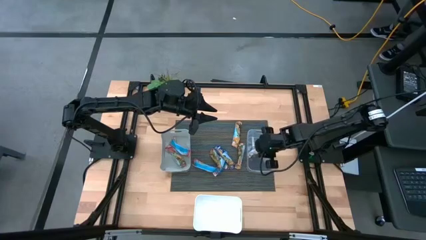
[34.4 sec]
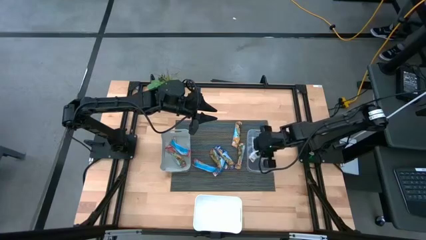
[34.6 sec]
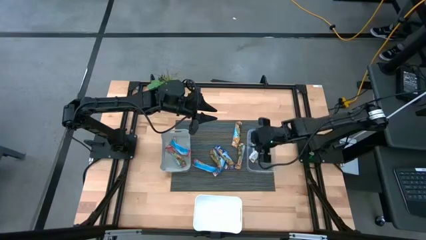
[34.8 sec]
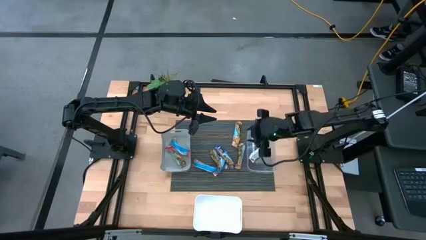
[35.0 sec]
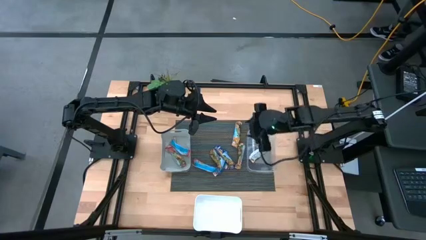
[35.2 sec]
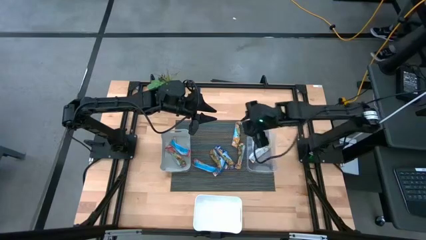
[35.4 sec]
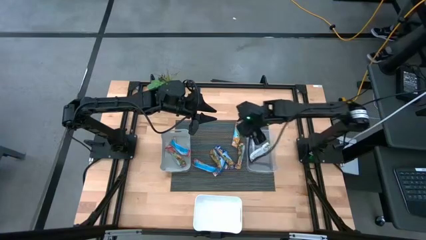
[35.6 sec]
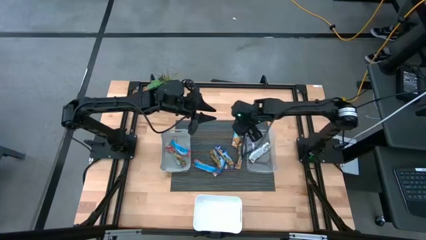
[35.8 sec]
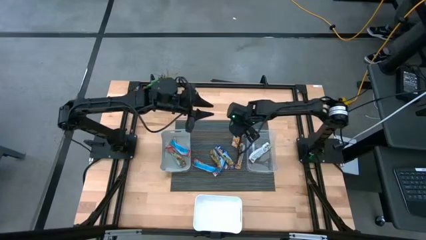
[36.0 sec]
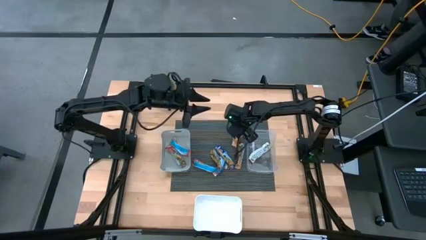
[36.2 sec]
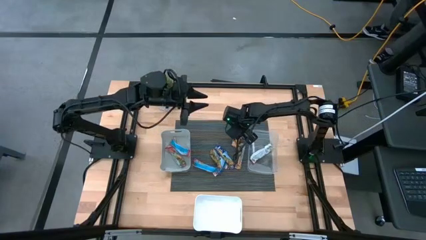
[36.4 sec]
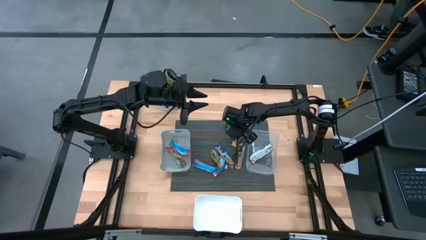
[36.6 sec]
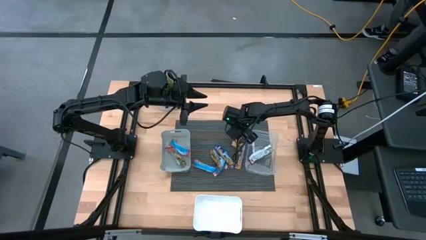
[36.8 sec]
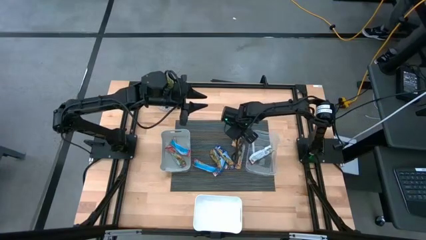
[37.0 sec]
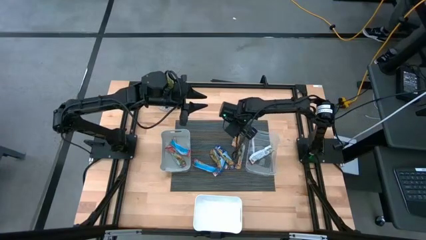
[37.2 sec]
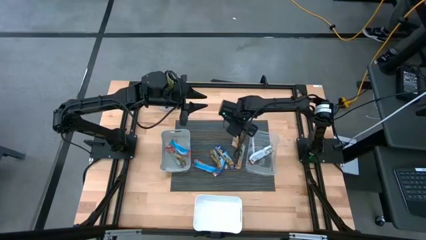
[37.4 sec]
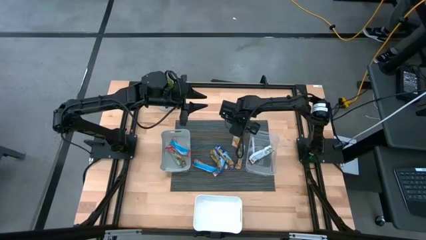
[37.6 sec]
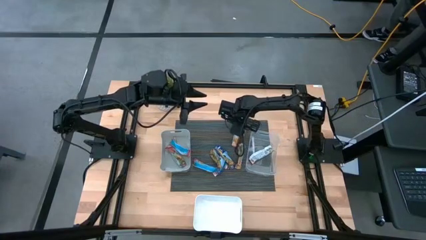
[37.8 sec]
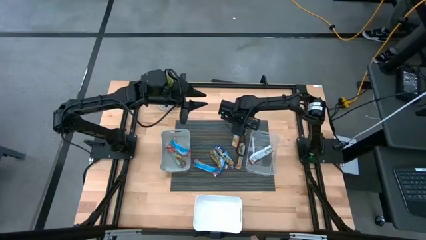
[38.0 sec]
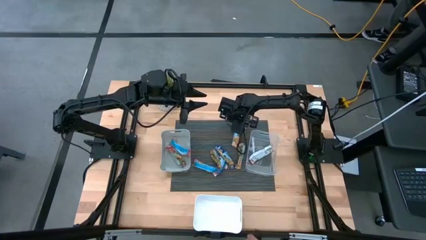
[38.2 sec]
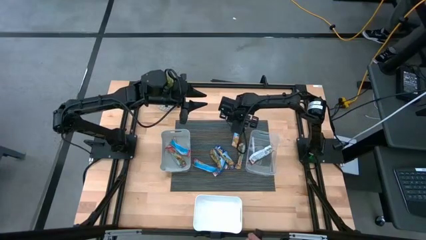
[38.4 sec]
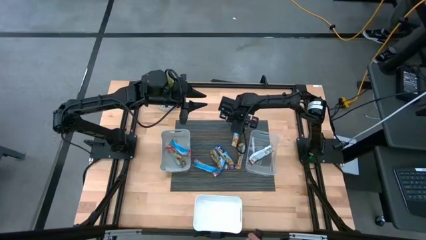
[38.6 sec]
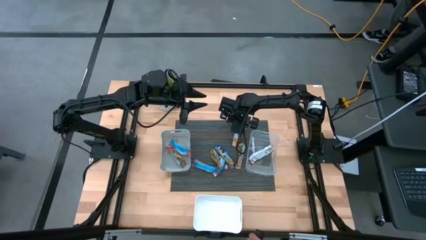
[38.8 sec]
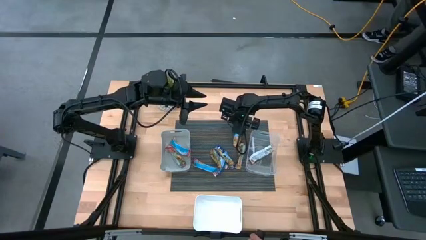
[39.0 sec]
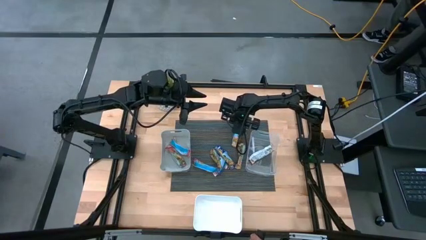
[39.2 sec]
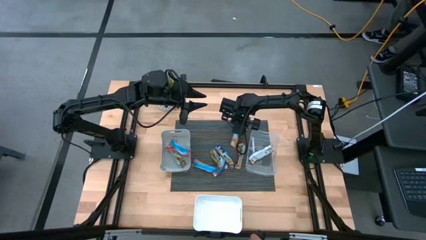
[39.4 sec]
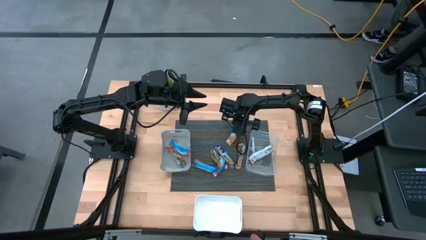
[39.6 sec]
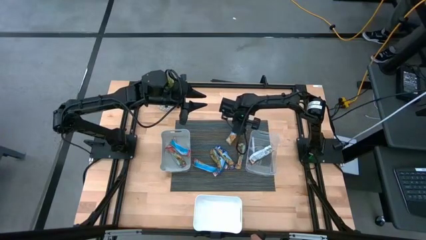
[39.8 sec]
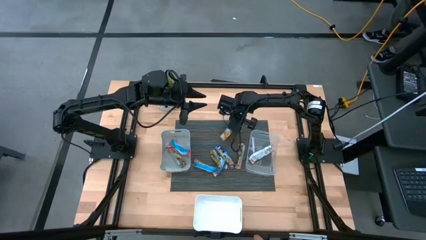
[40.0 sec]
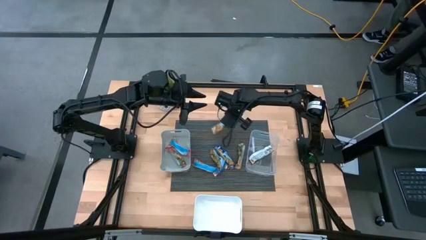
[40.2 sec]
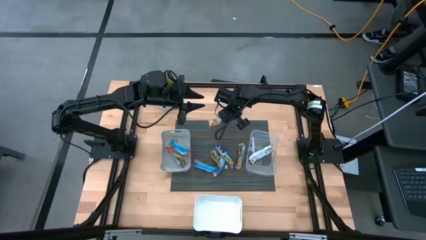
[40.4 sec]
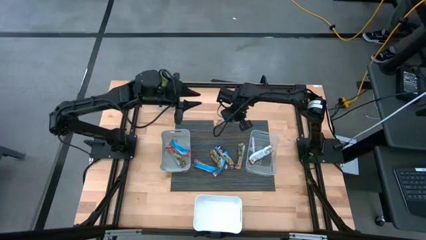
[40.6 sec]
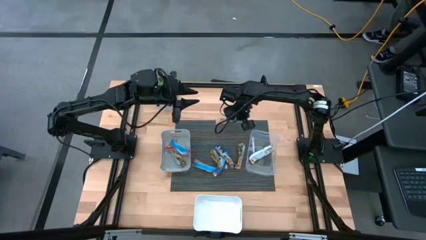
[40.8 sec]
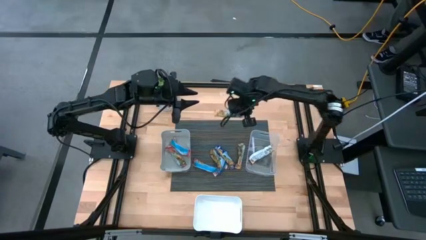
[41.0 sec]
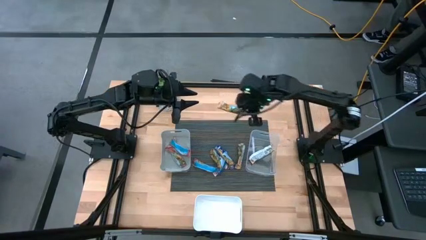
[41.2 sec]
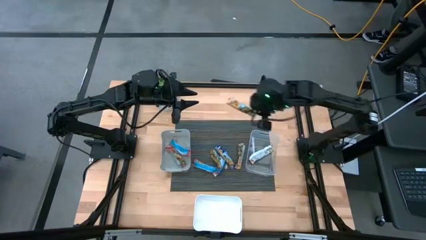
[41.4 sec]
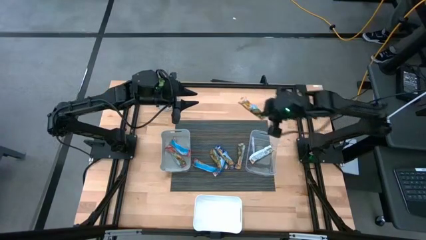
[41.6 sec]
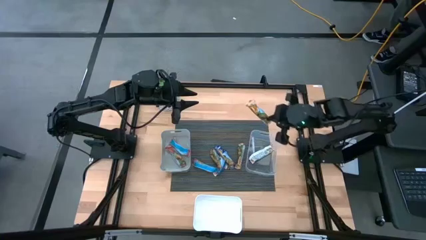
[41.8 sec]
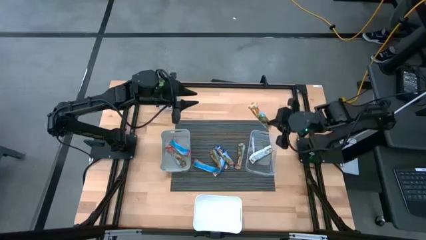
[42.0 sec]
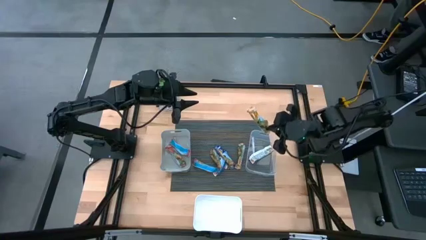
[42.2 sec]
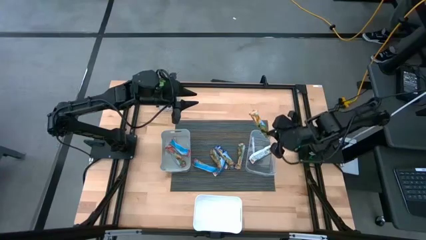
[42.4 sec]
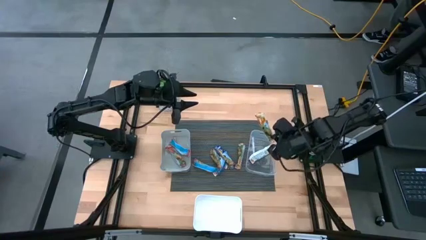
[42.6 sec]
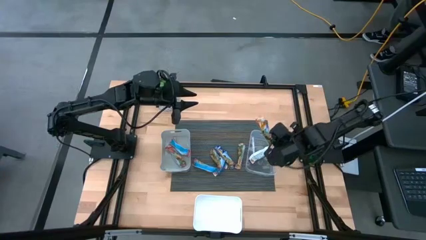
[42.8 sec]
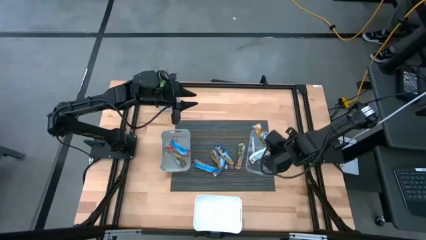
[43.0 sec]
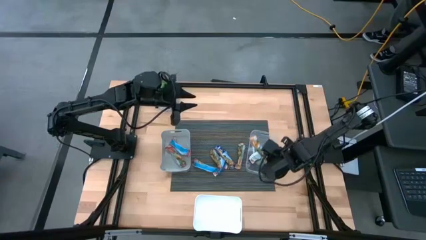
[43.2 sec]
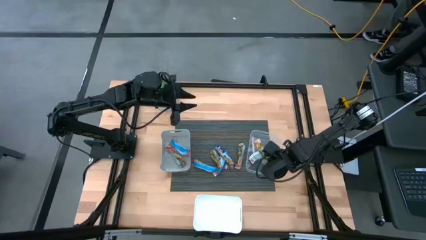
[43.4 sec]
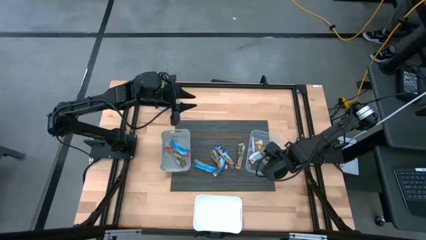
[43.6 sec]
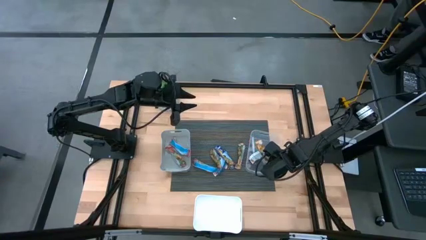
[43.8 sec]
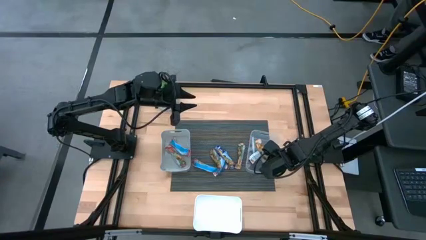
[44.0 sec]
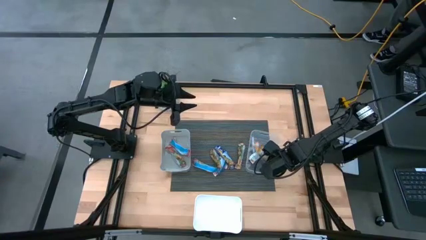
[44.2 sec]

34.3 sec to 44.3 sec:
Task: Pick and place Granola Bars by type
Put the yellow granola bar into the transparent bin

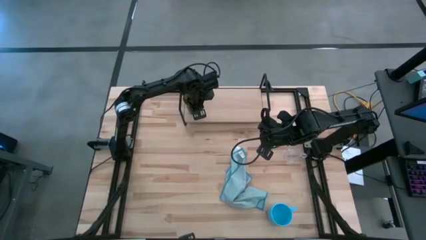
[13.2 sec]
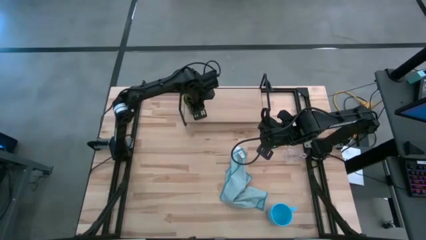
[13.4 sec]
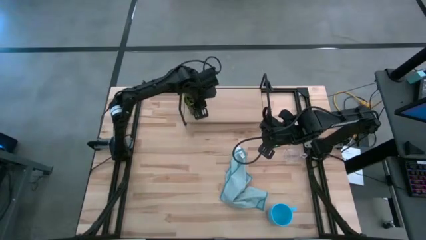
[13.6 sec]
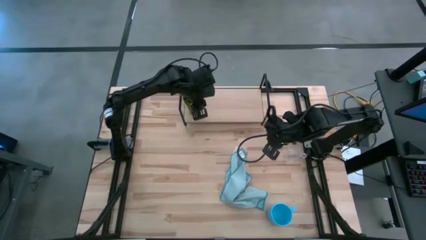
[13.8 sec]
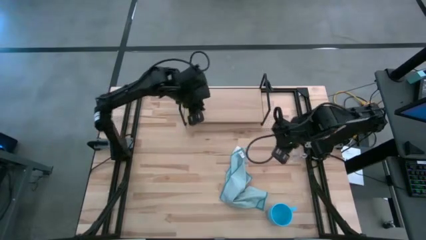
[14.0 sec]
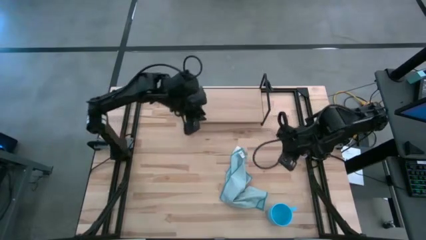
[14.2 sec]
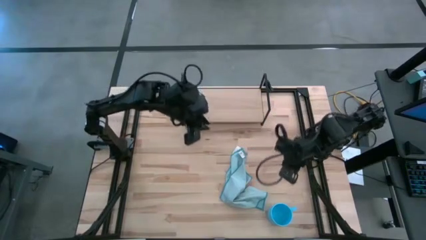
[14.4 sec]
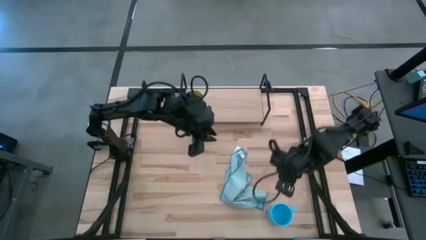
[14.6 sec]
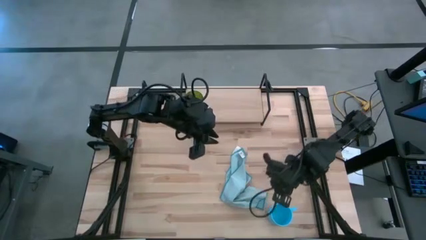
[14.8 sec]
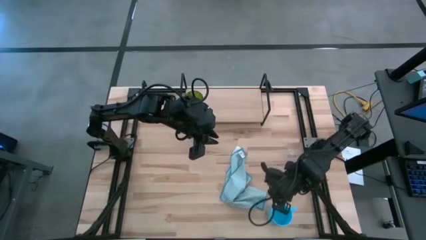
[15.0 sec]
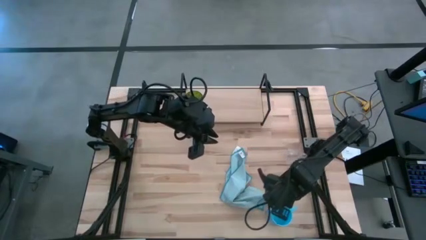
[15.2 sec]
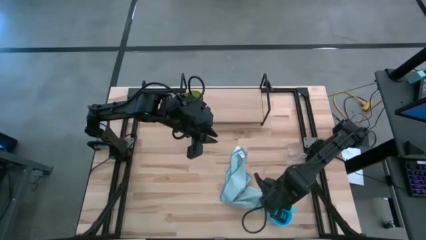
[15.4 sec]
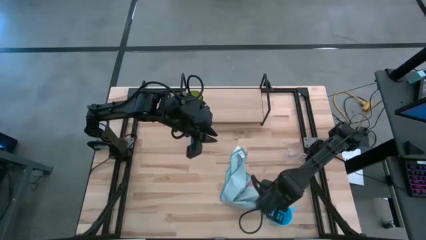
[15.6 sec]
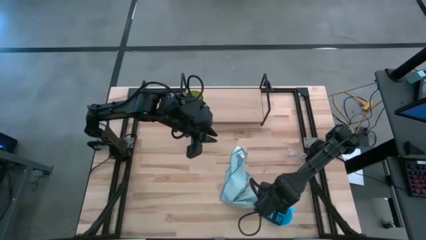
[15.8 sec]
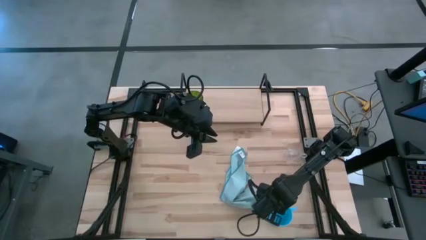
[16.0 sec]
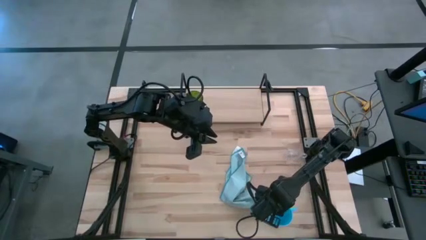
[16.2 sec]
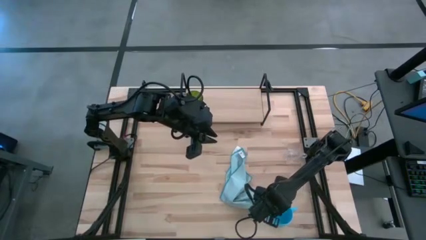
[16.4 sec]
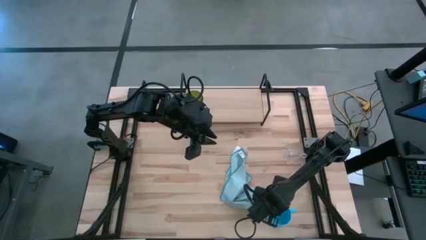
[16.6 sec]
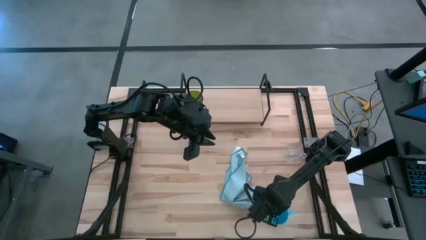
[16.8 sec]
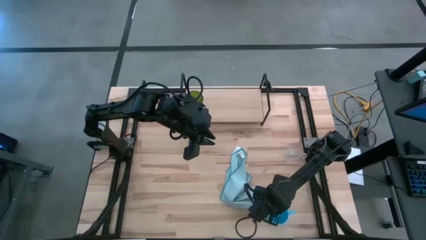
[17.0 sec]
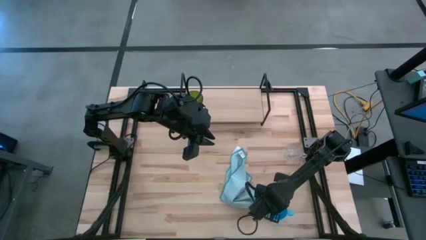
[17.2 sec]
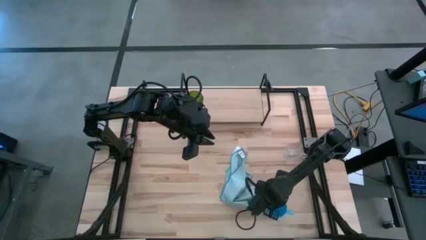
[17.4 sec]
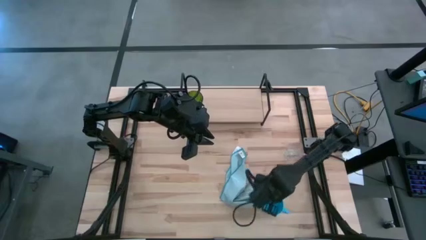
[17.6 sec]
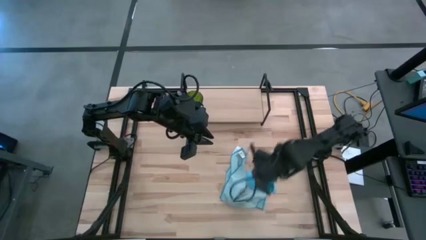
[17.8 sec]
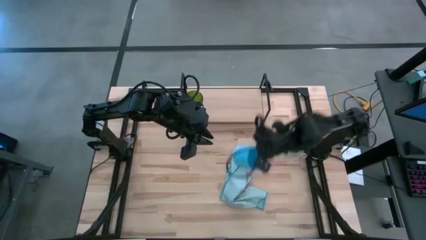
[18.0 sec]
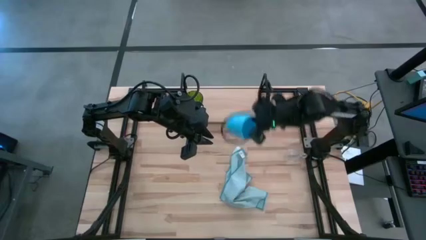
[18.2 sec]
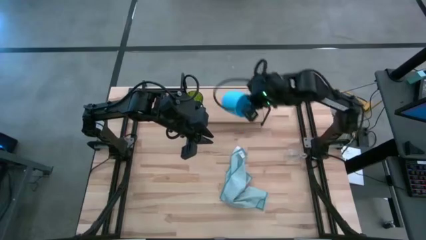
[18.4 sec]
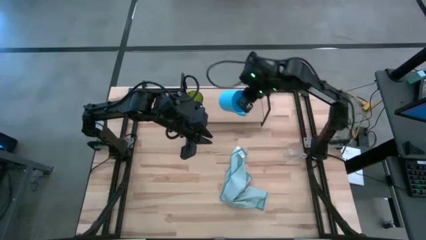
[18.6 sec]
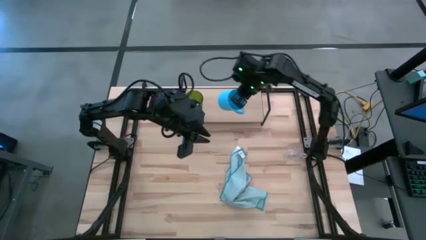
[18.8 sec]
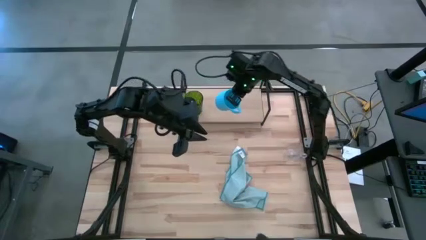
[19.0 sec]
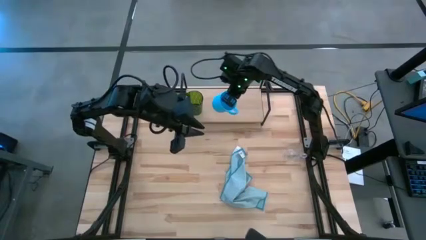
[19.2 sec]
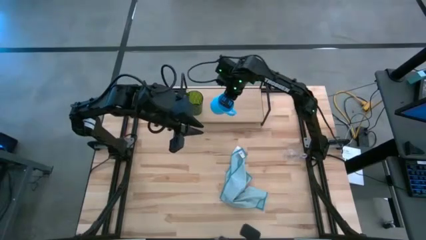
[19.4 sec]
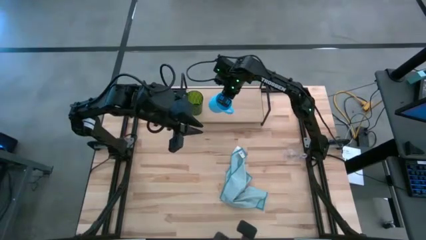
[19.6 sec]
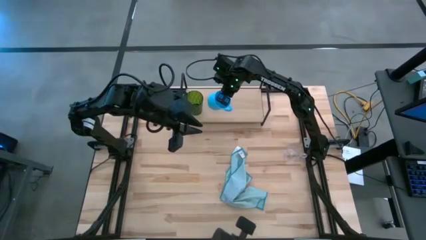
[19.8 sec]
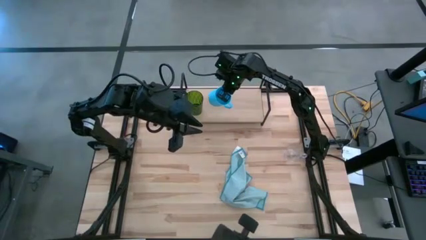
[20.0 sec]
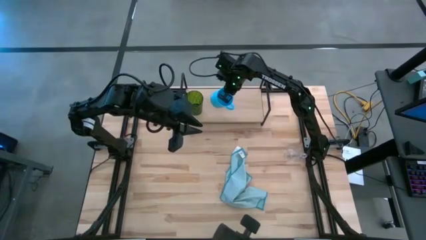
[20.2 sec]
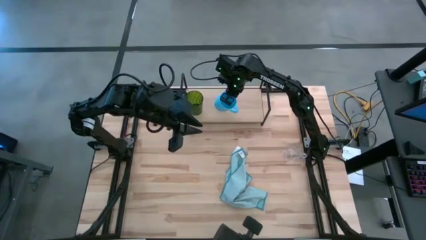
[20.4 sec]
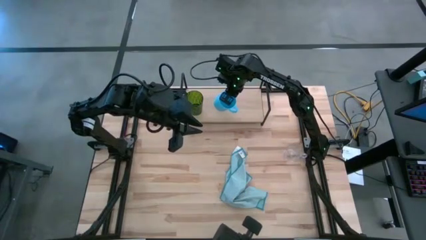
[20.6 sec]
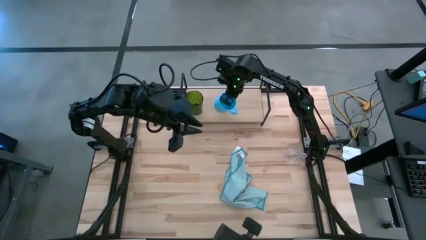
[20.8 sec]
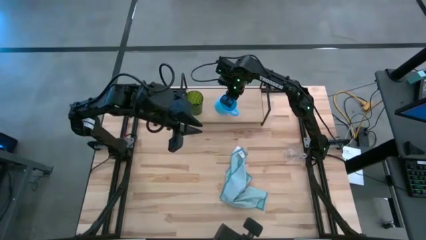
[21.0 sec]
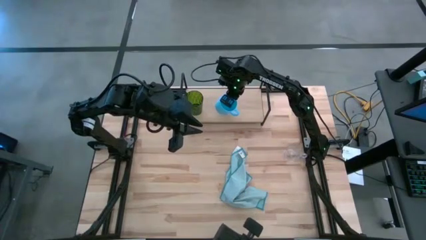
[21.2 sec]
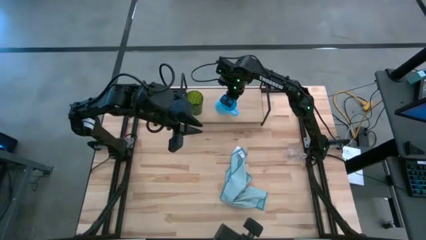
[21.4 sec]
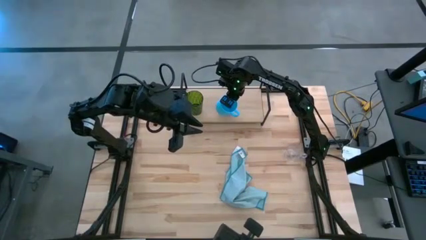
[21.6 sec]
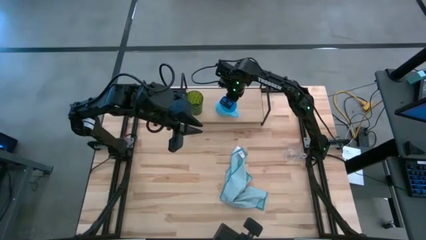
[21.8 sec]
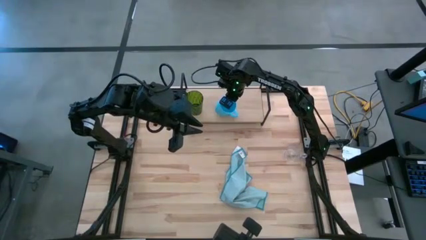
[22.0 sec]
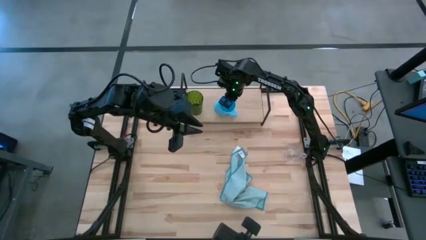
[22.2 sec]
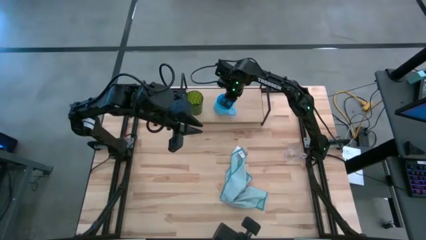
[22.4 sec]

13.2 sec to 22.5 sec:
Task: Stack small to large cups/mugs on shelf
Put the blue mug on the shelf
